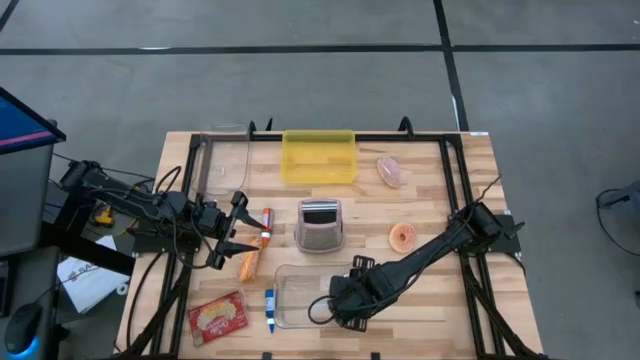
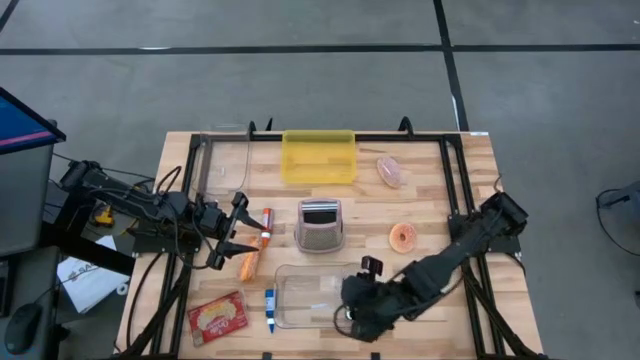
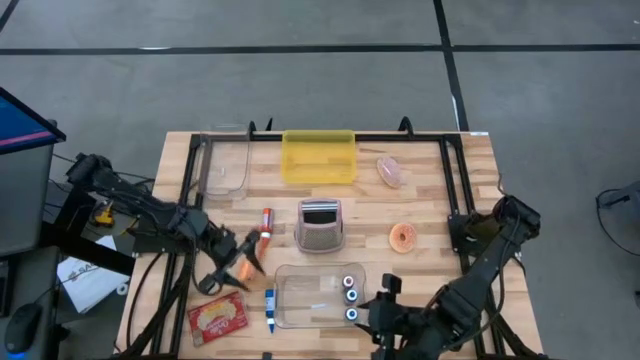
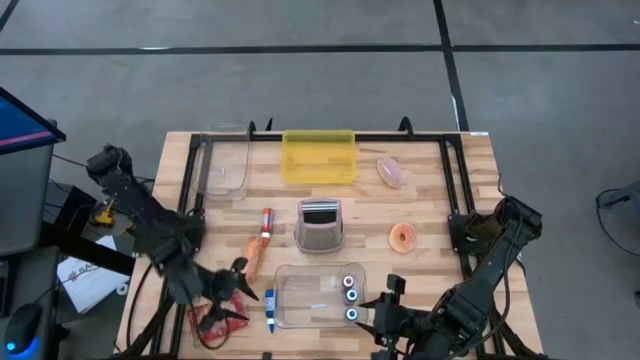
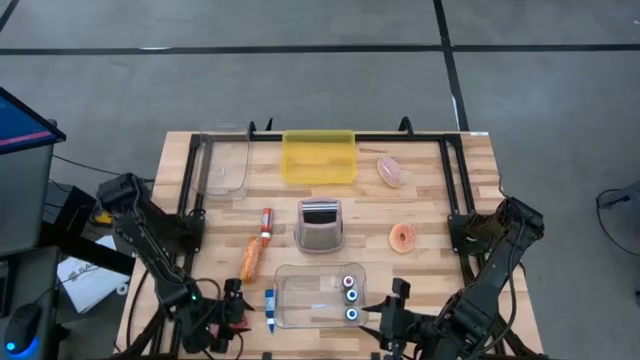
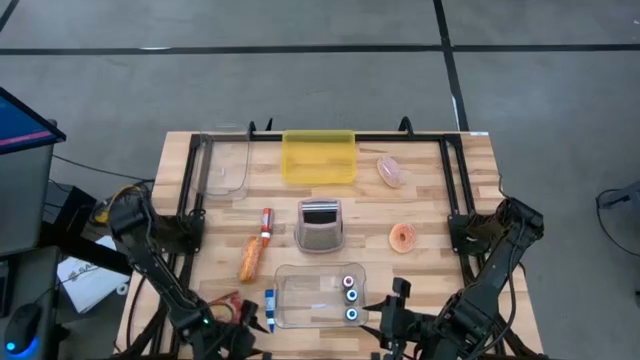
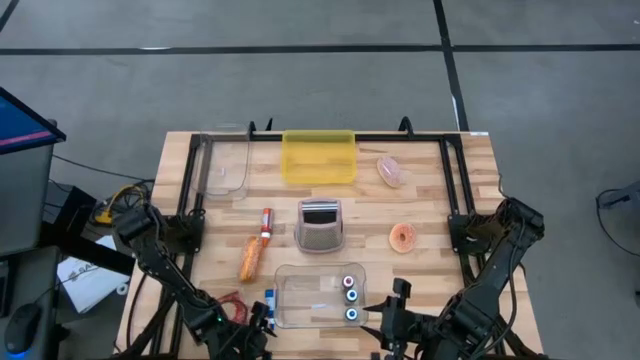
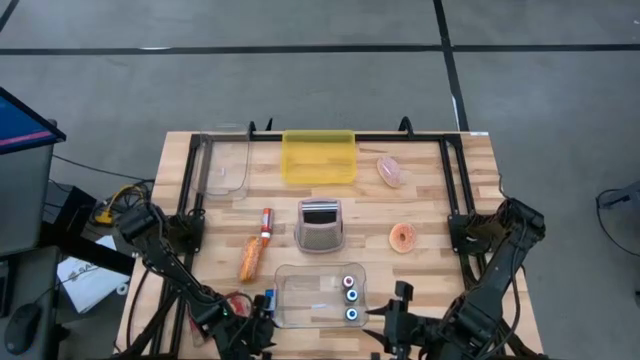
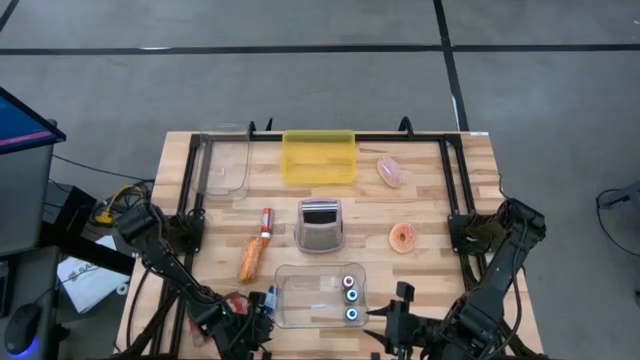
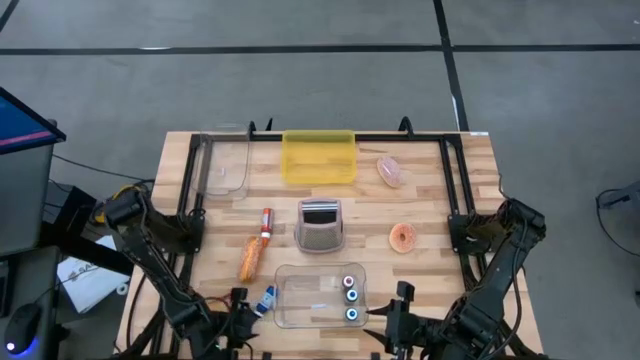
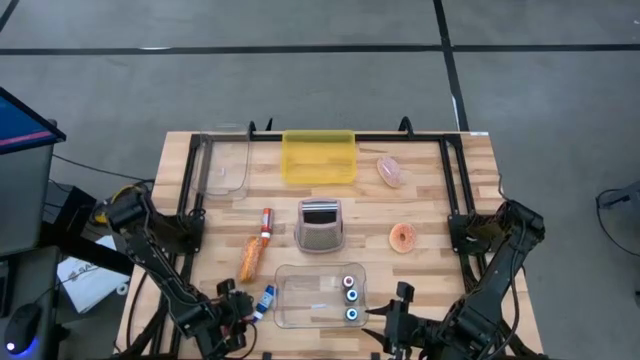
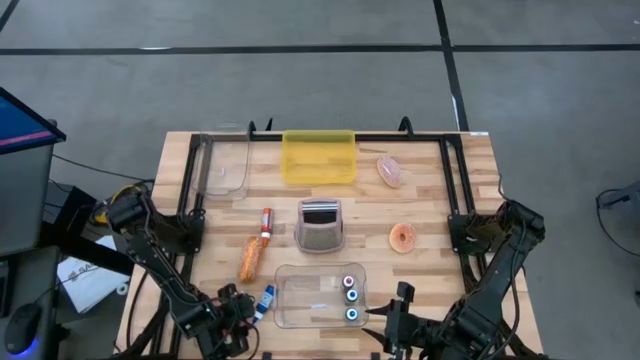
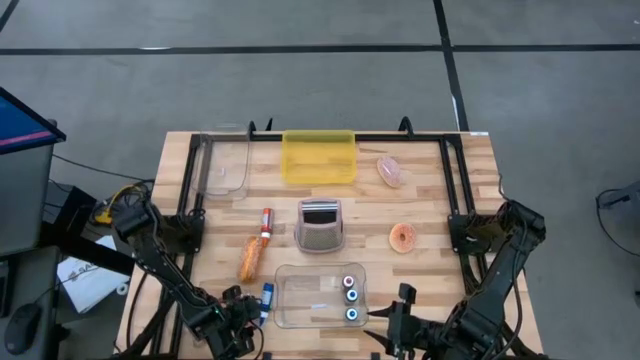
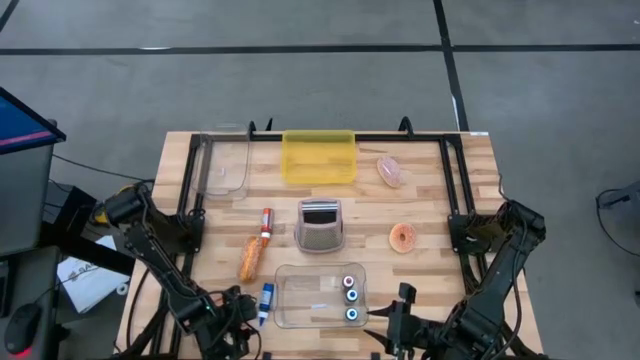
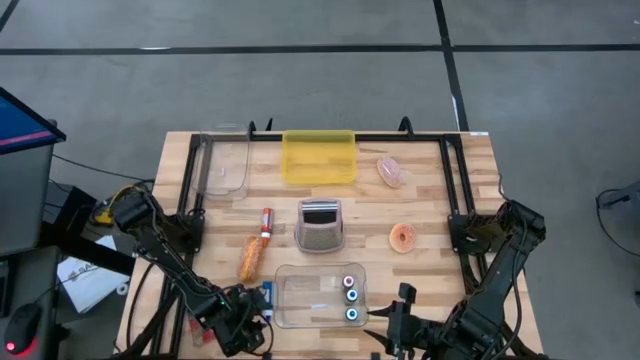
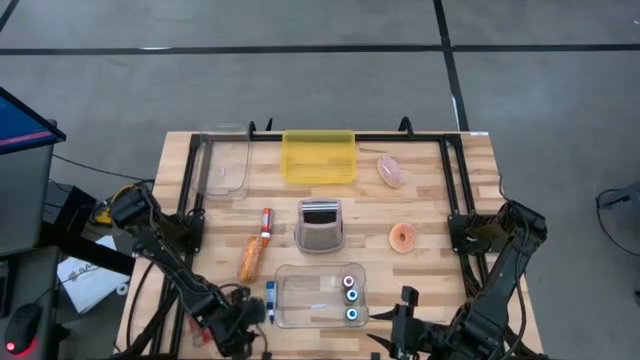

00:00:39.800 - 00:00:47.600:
Put the blue food coloring bottle into the bottom transparent bin

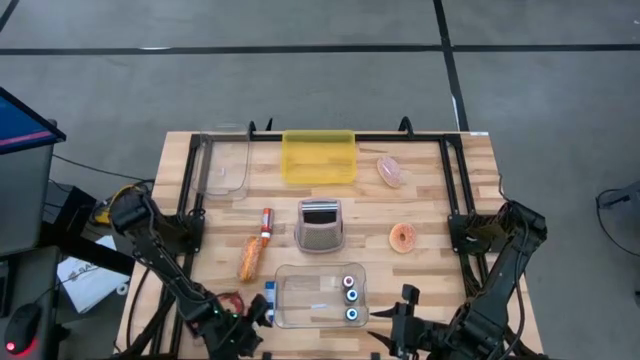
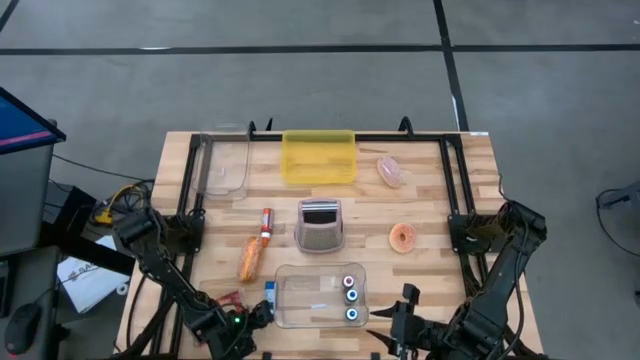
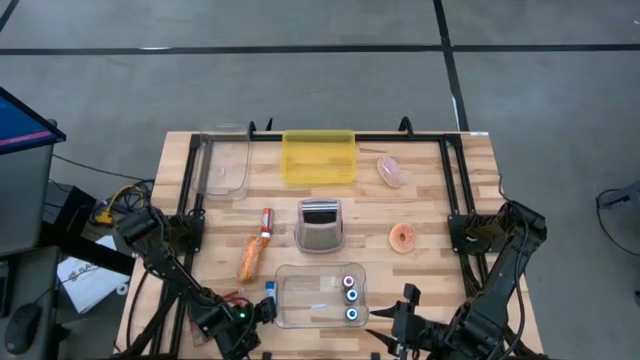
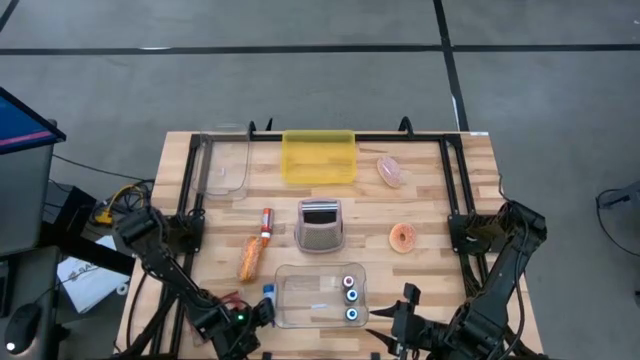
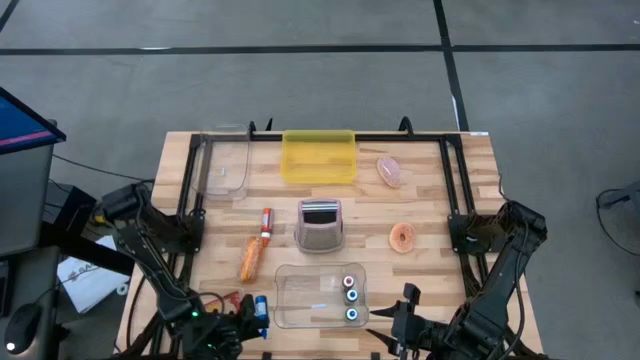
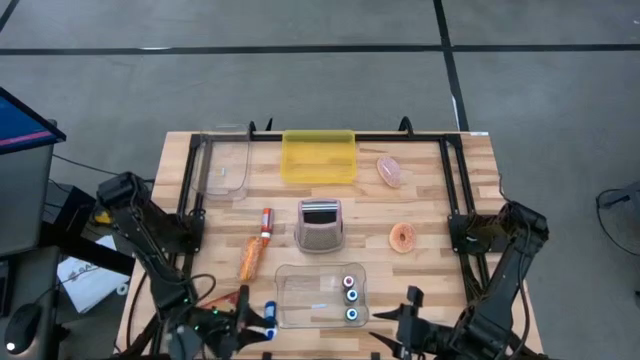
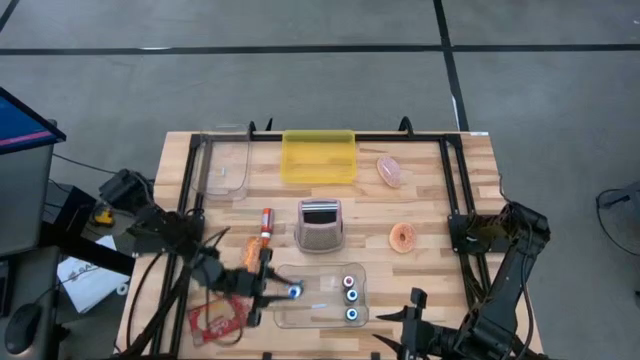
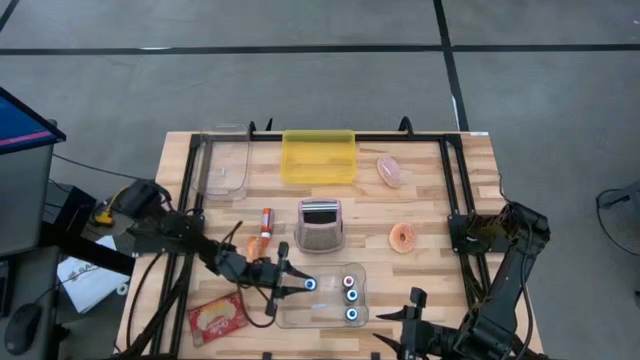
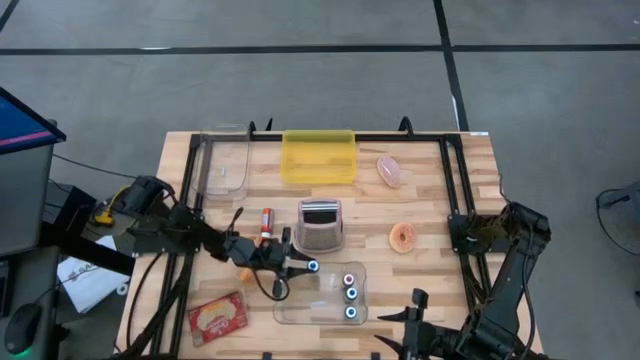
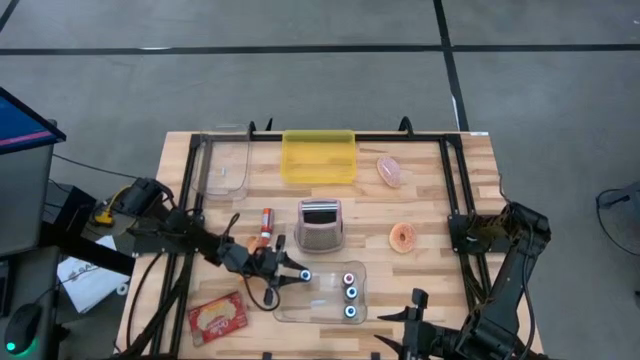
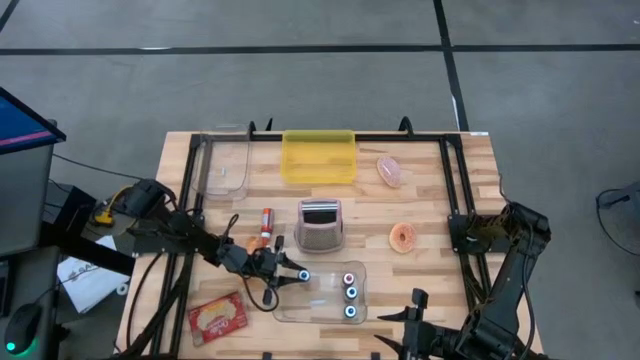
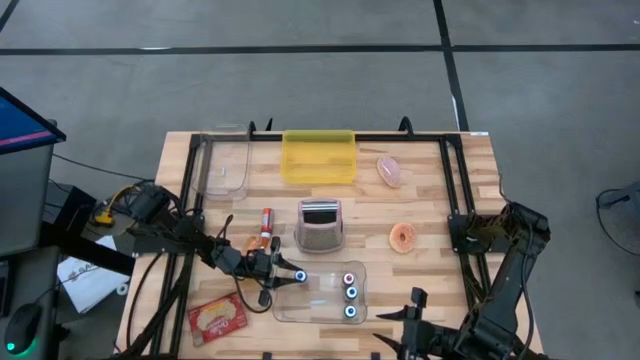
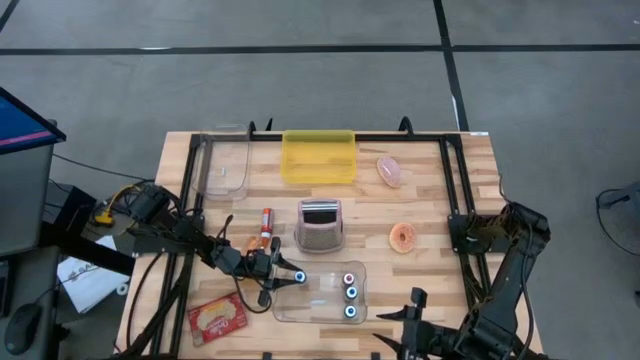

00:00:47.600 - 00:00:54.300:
Put the blue food coloring bottle into the bottom transparent bin

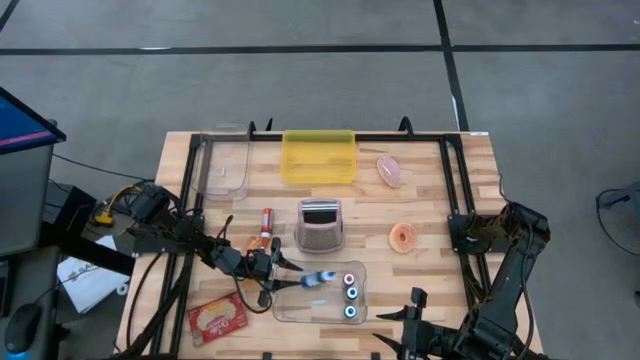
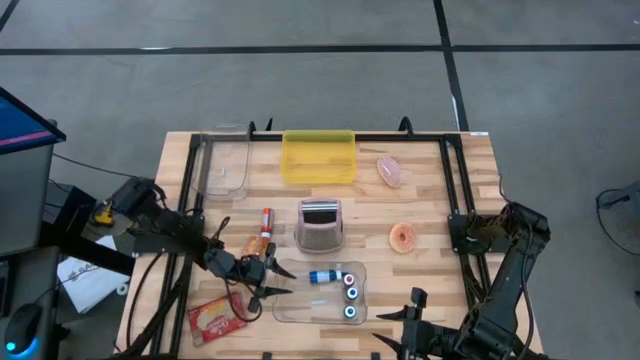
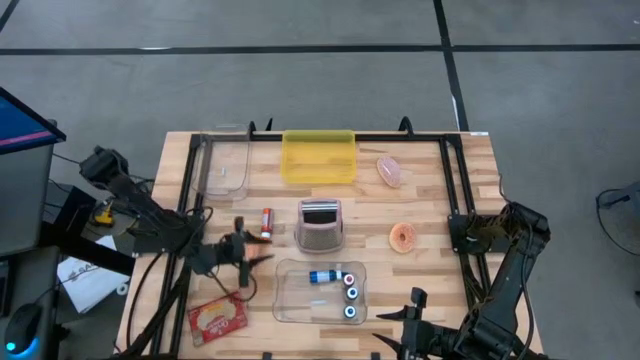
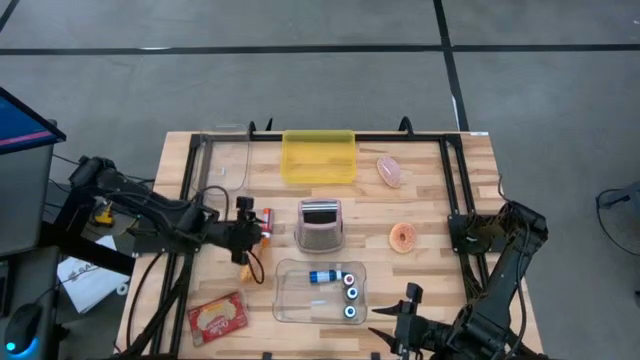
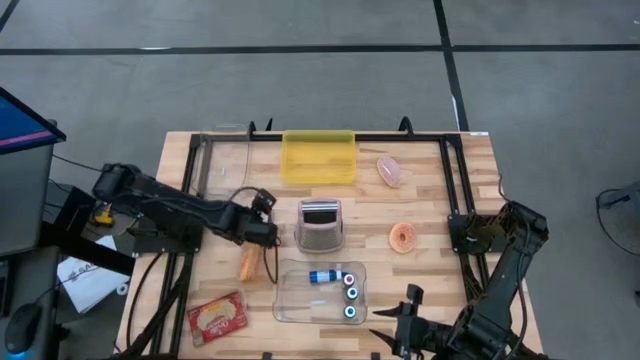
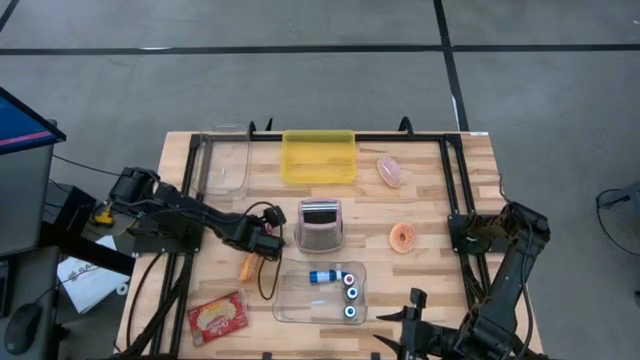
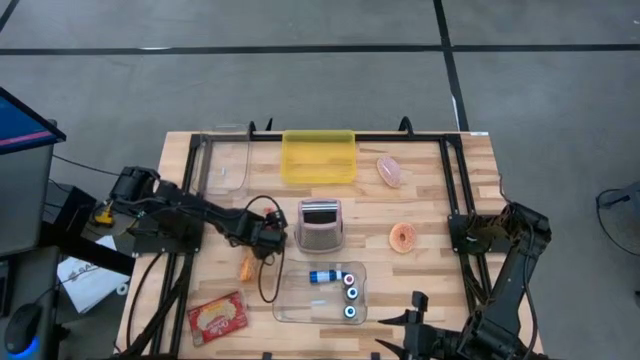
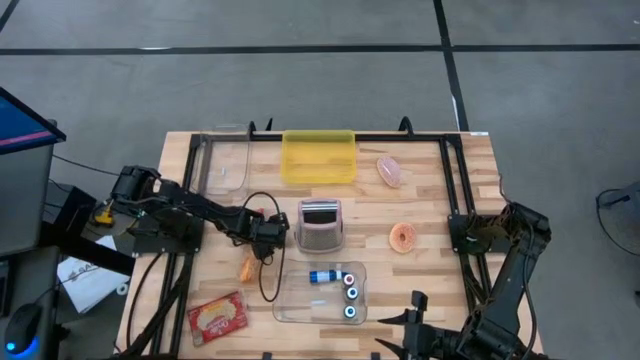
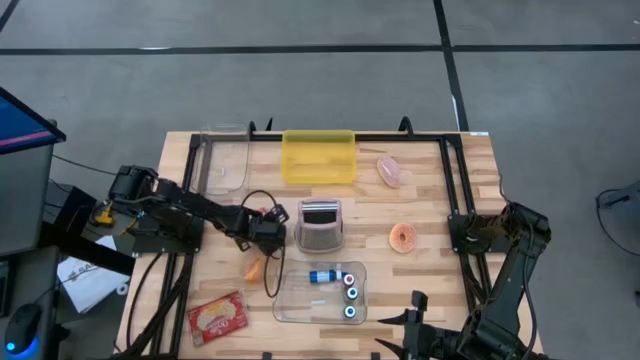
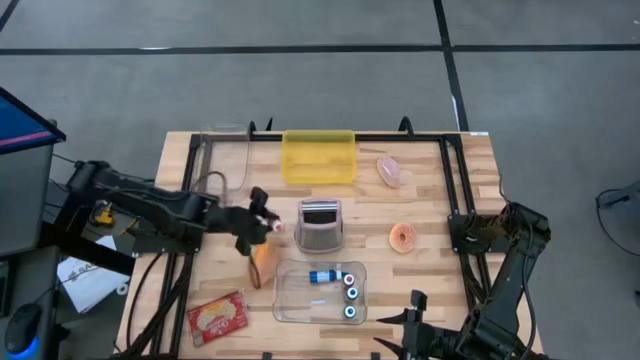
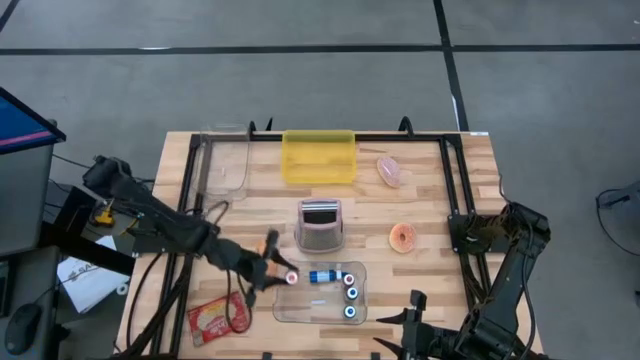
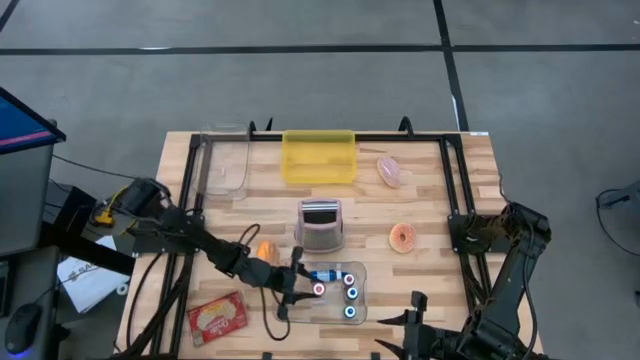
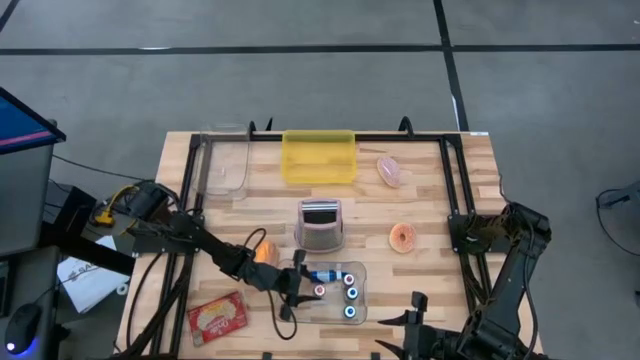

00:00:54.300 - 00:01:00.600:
Put the orange food coloring bottle into the bottom transparent bin
